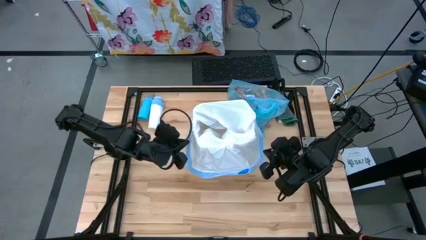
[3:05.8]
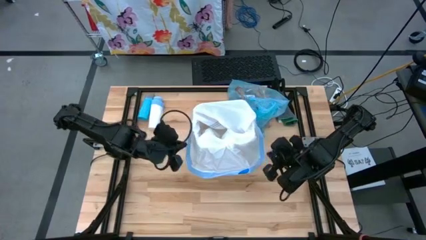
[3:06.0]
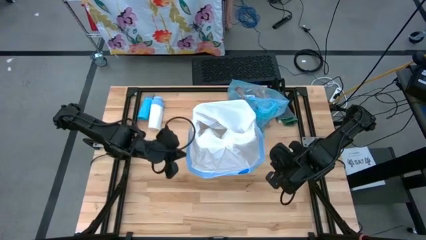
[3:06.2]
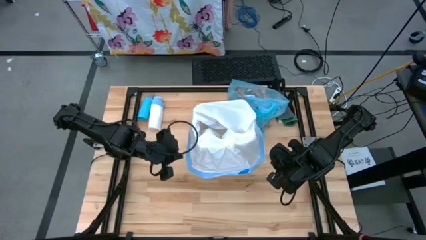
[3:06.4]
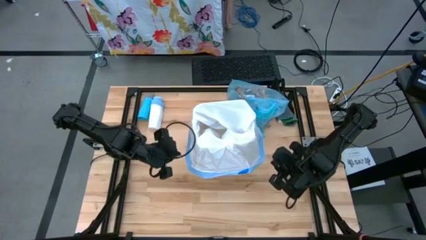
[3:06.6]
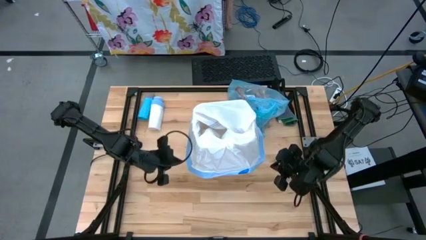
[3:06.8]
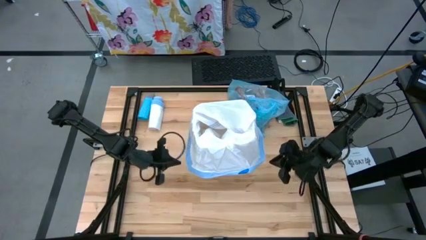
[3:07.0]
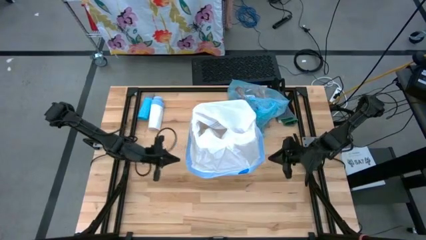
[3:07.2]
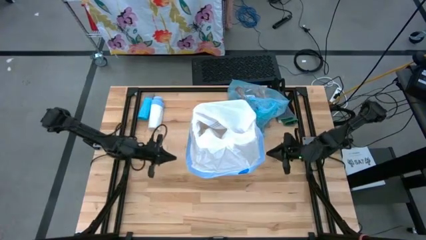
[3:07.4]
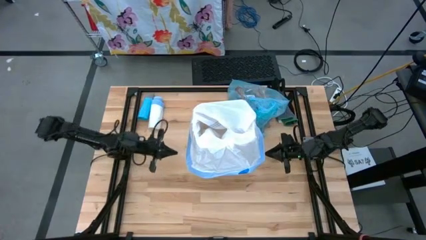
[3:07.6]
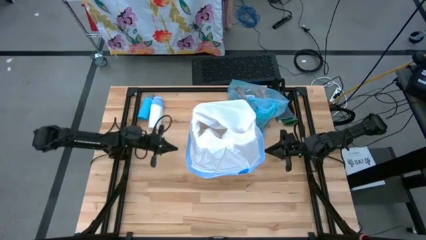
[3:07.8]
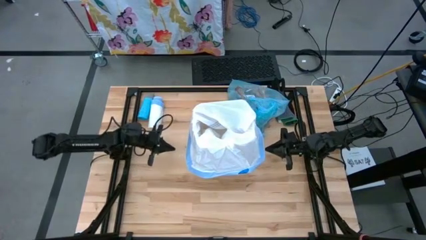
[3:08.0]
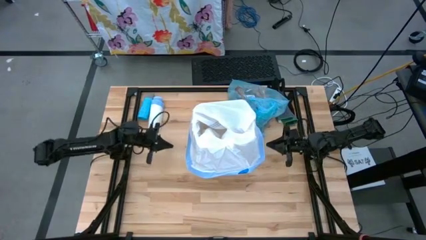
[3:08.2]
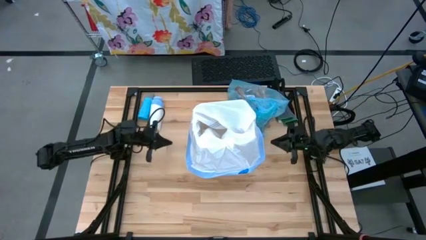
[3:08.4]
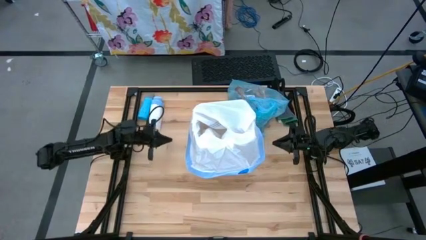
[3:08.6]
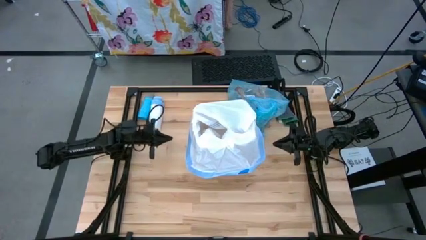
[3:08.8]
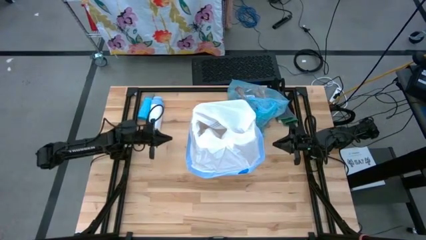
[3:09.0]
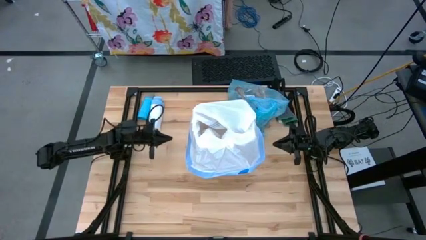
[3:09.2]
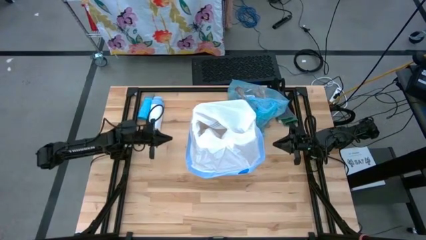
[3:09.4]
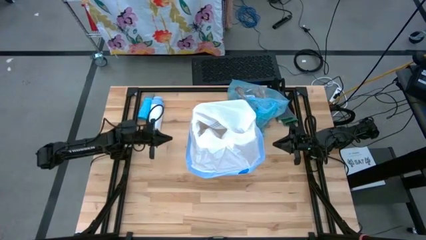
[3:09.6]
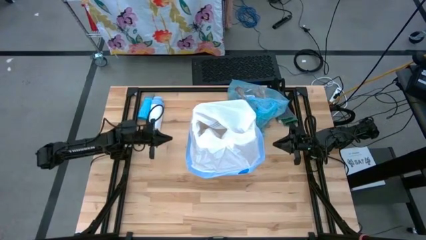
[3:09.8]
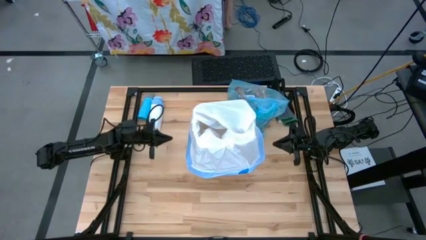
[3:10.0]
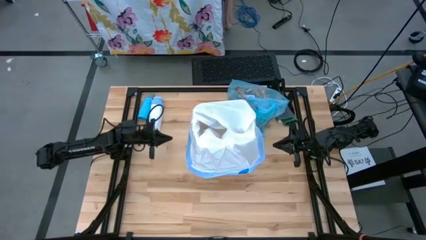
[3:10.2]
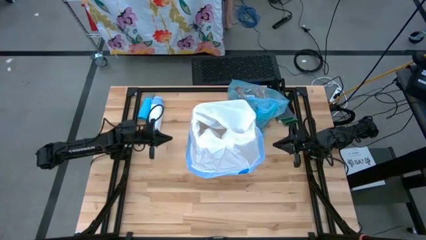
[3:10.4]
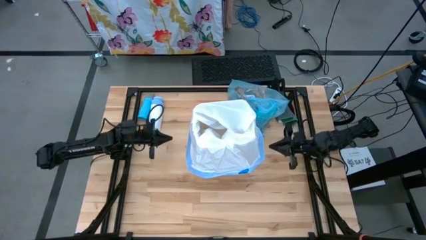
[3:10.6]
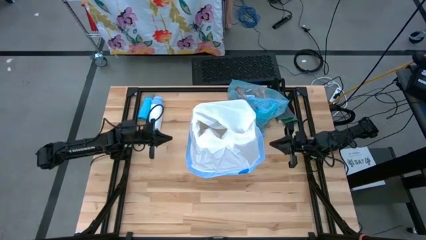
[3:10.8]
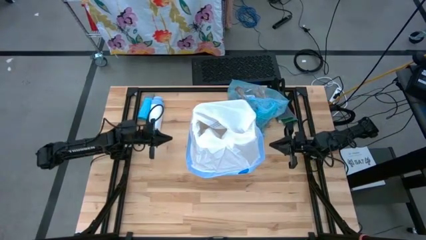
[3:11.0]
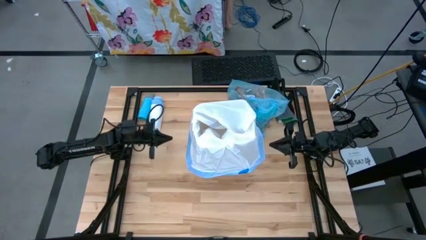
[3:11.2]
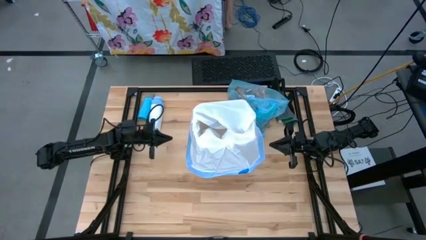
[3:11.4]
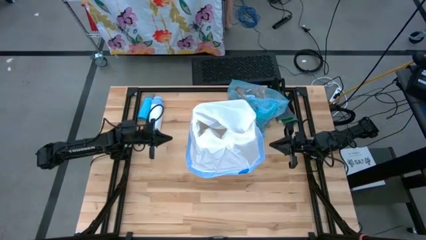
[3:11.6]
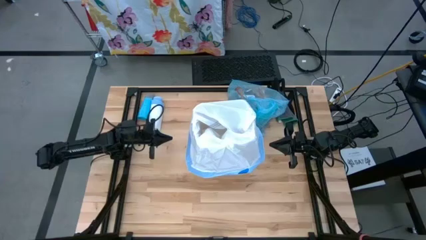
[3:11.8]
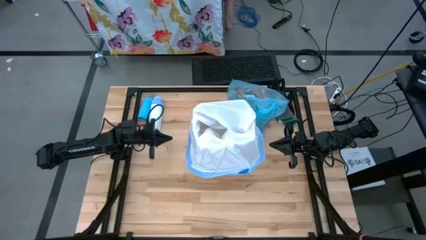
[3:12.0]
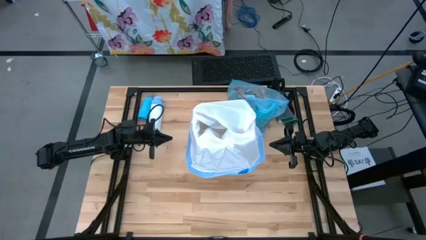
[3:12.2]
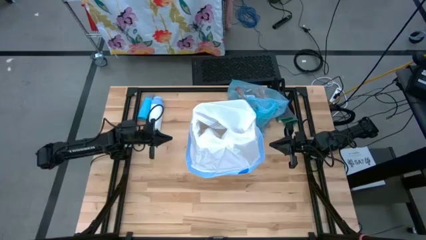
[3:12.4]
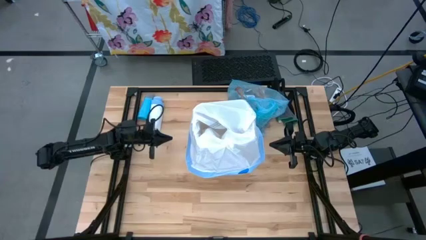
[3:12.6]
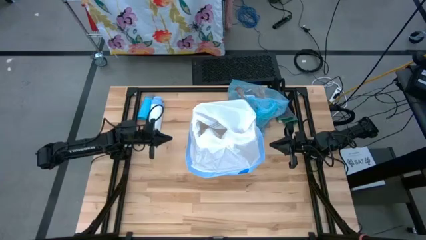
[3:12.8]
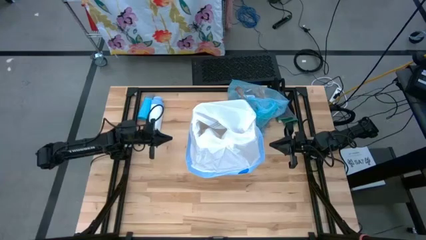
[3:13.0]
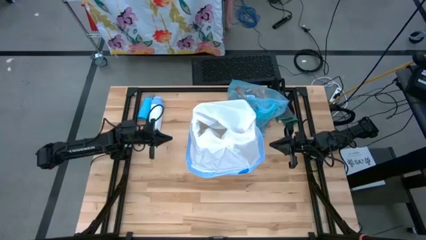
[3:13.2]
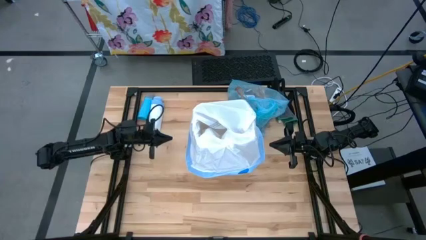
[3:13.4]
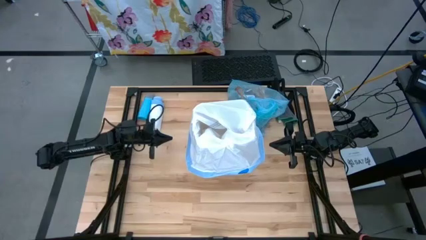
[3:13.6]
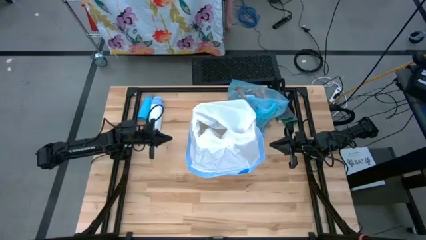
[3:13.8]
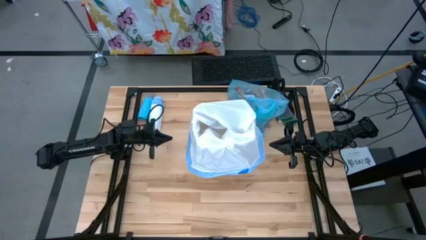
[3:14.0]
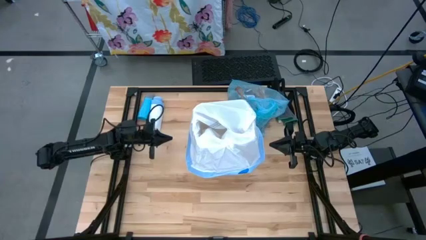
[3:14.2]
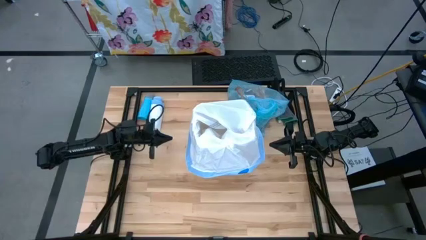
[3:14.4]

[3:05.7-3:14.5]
Task: place trash/remove bag and relplace
Return to Home Position

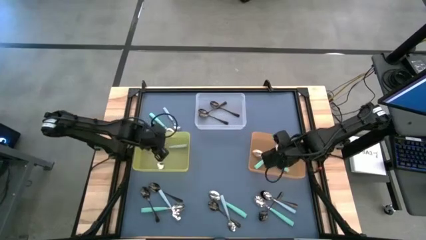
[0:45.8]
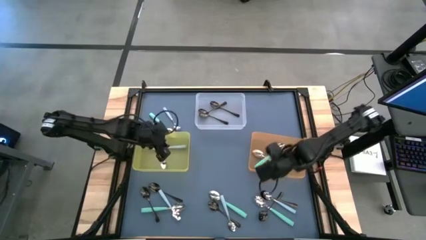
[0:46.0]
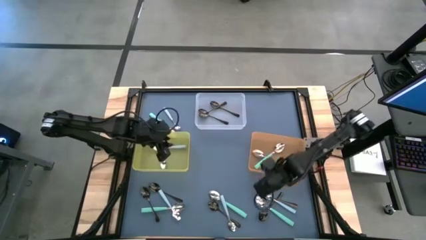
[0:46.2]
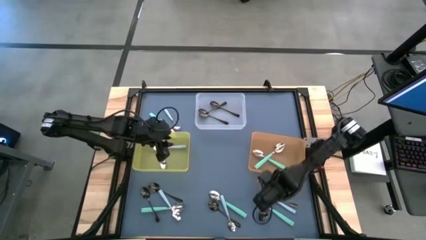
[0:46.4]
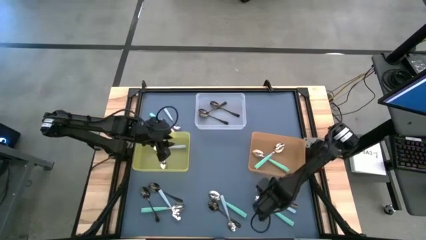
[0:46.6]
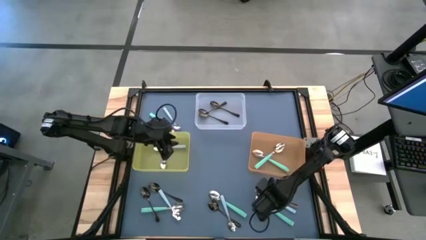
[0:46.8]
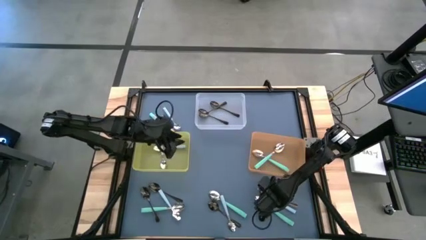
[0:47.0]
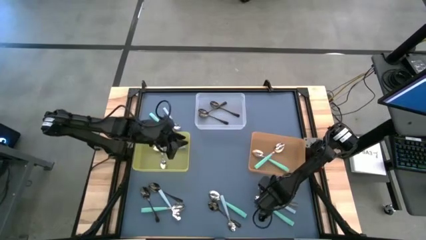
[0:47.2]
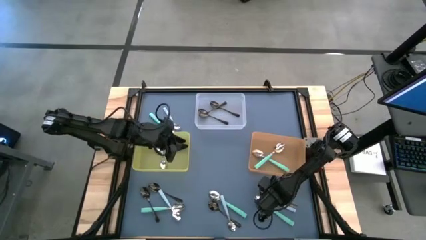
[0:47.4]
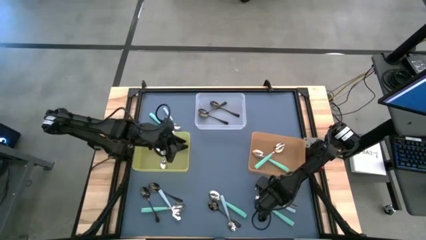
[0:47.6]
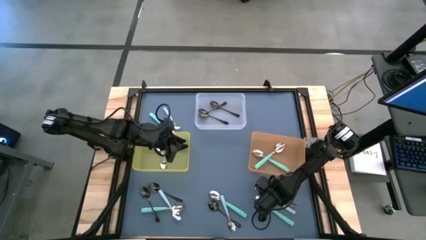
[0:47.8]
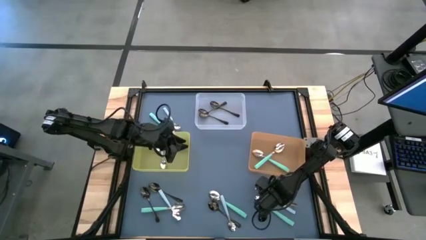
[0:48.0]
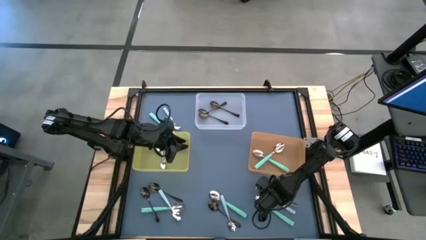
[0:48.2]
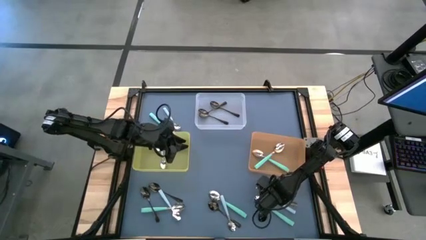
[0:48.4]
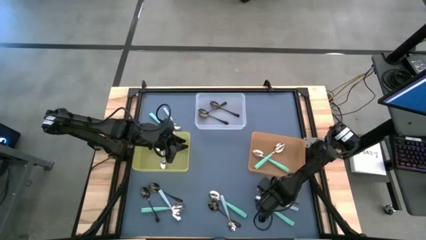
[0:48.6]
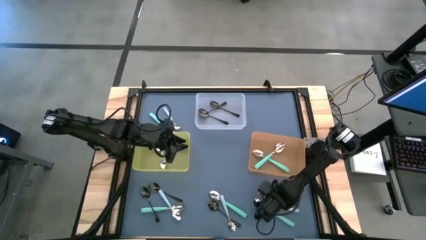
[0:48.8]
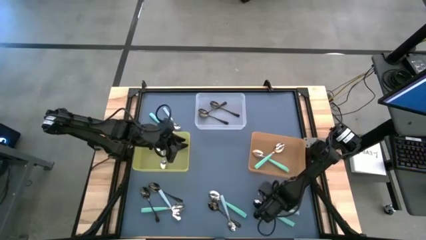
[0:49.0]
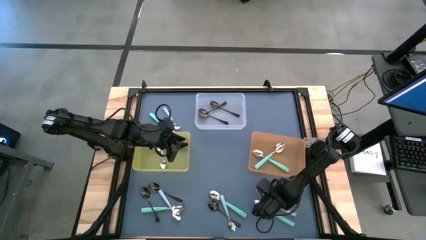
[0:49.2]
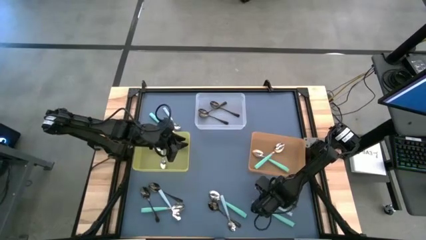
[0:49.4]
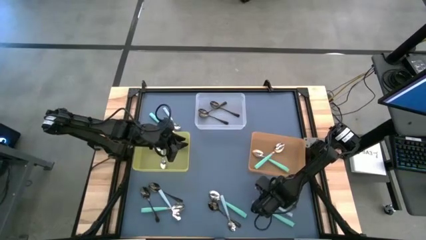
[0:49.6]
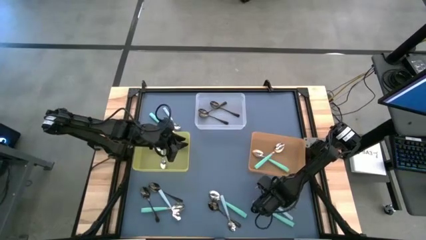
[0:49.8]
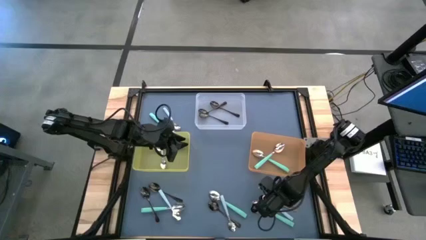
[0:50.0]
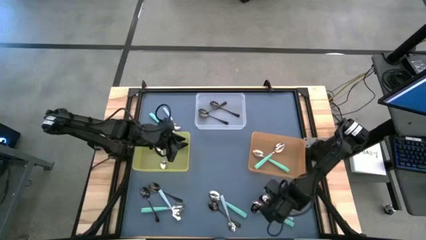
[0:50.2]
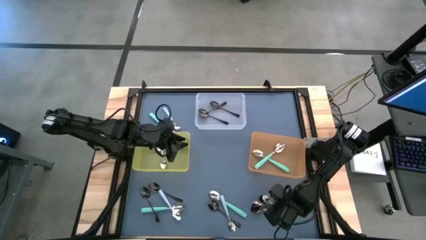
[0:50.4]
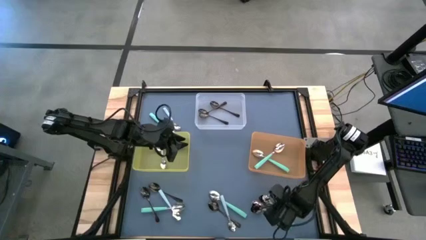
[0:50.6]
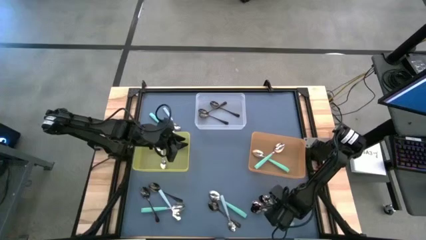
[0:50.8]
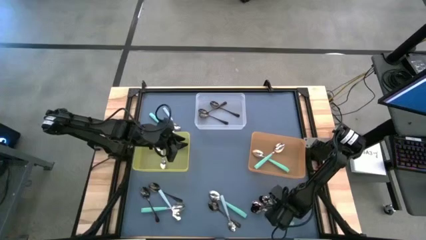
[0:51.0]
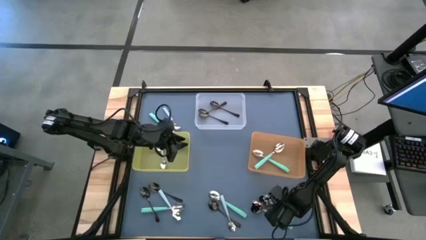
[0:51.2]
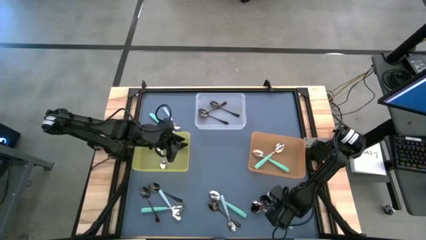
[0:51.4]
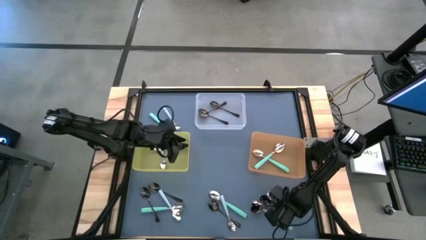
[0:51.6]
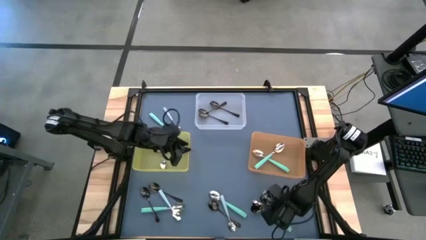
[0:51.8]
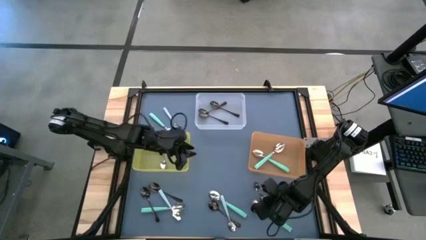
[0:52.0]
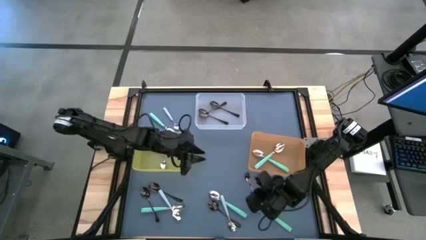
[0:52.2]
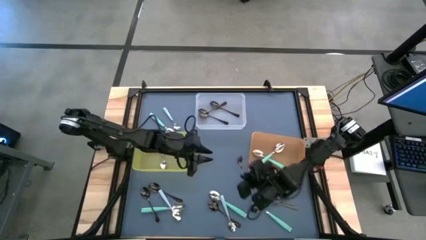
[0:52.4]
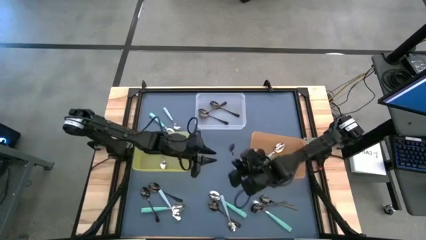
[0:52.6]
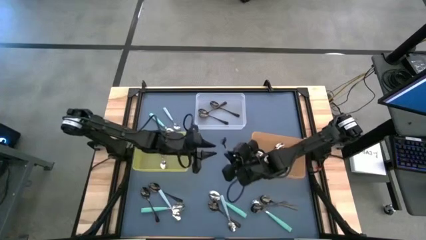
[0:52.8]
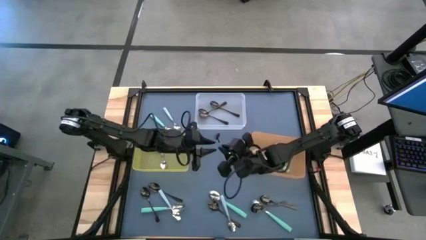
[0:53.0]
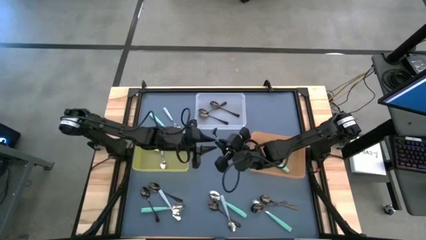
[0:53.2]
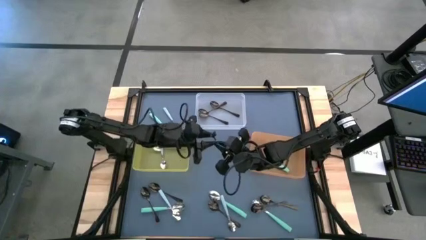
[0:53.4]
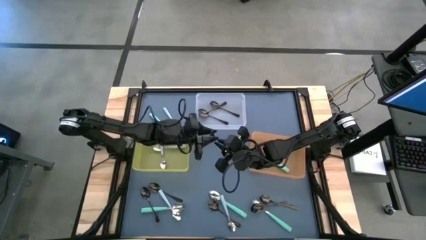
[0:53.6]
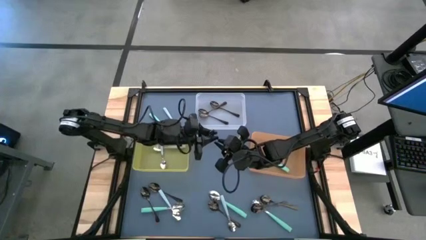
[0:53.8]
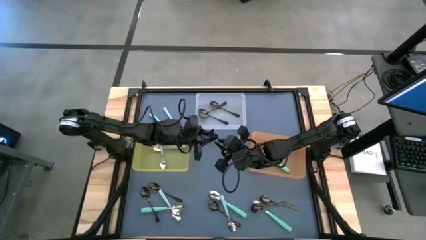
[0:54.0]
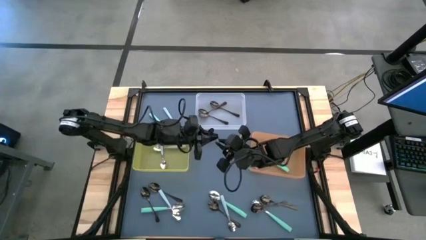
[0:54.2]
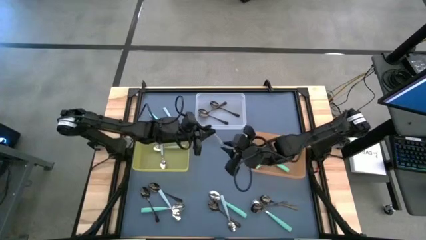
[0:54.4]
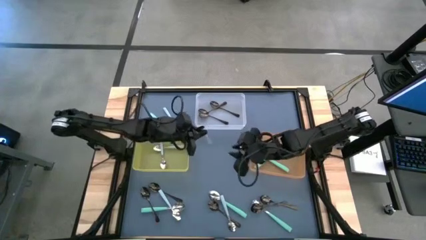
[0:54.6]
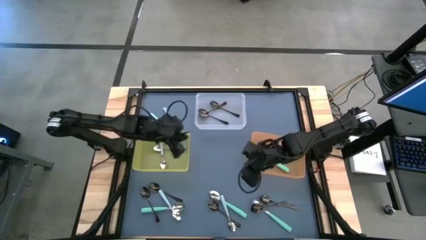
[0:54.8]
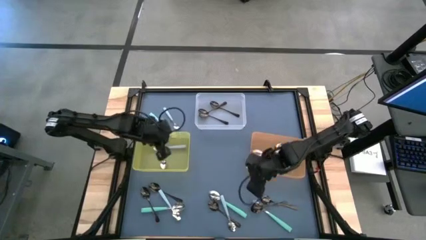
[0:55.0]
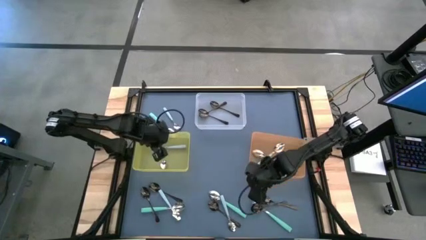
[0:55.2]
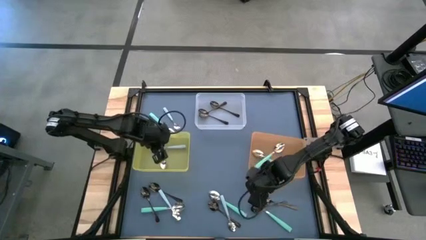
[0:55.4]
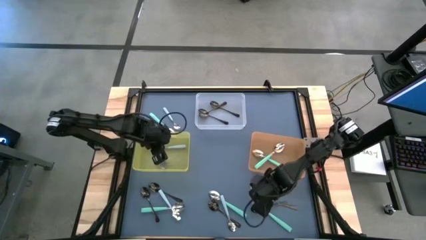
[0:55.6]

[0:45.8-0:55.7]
Task: Sort silverware by color (type)
Put the blue spoon into the yellow bin
